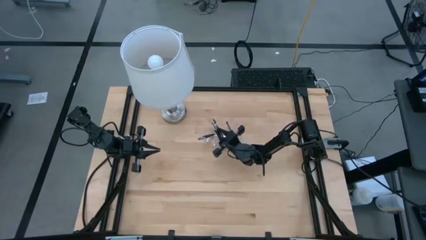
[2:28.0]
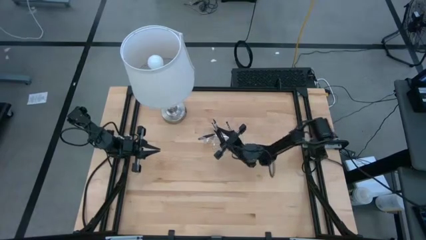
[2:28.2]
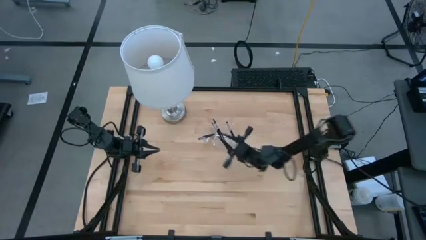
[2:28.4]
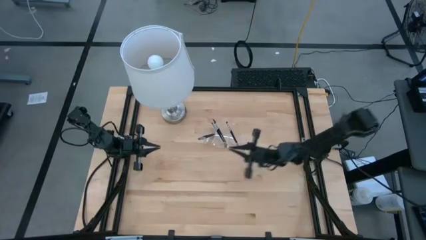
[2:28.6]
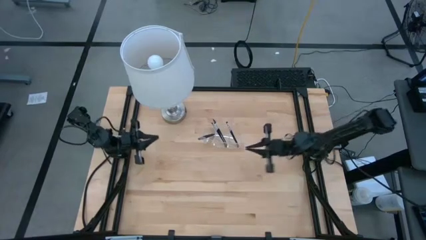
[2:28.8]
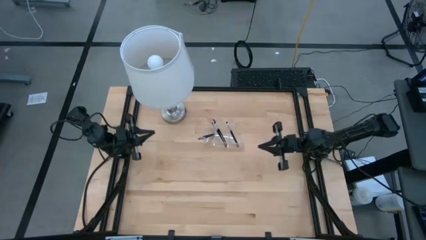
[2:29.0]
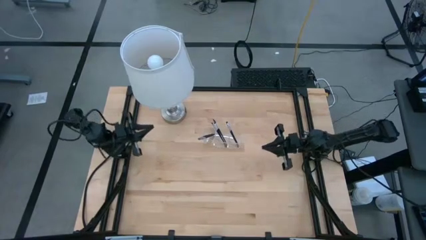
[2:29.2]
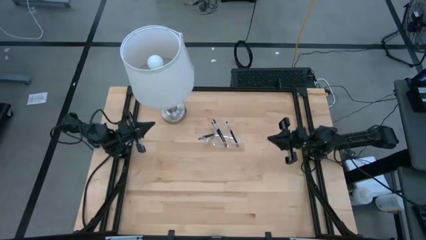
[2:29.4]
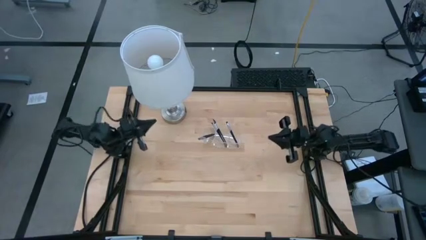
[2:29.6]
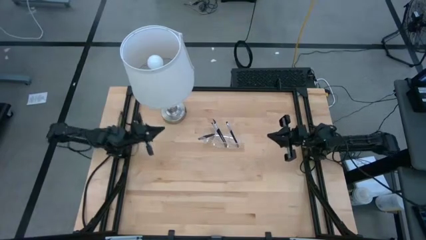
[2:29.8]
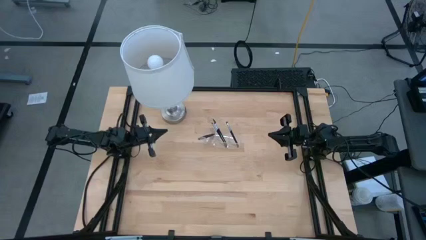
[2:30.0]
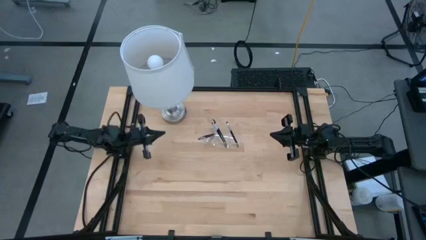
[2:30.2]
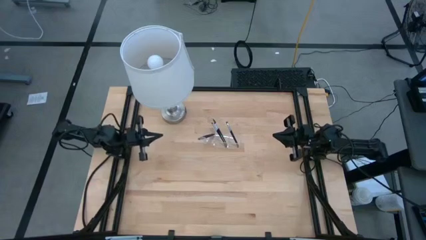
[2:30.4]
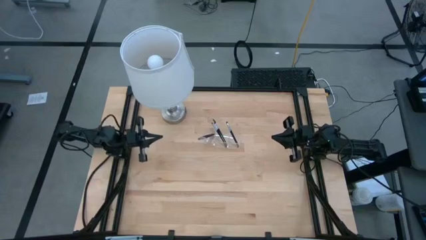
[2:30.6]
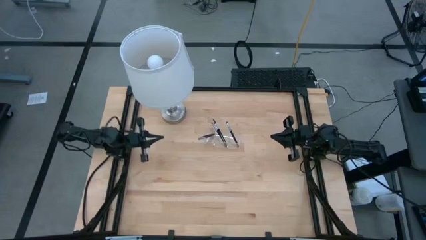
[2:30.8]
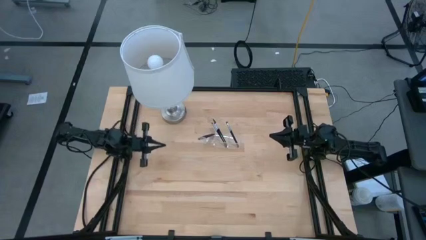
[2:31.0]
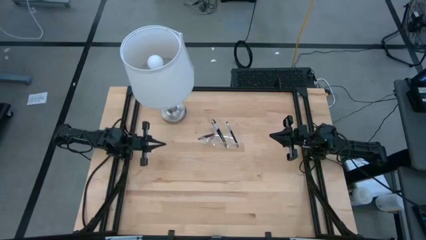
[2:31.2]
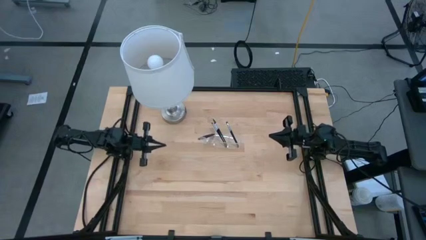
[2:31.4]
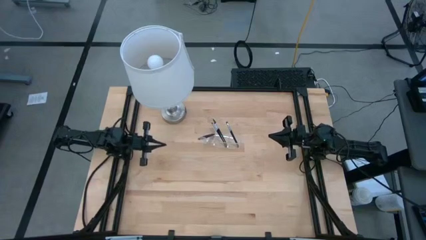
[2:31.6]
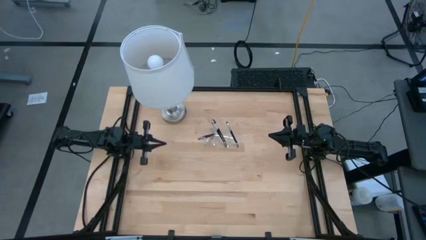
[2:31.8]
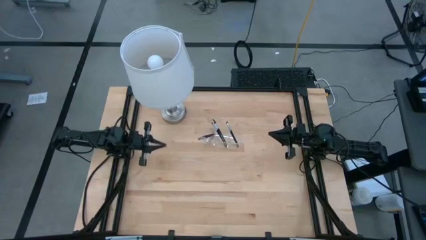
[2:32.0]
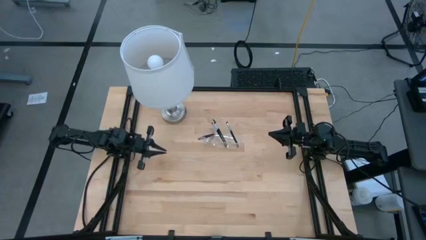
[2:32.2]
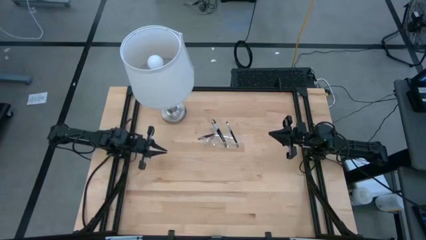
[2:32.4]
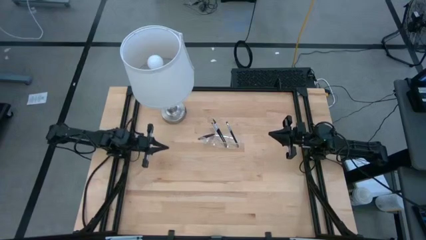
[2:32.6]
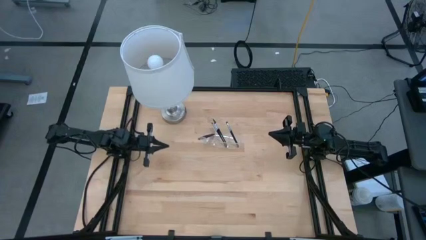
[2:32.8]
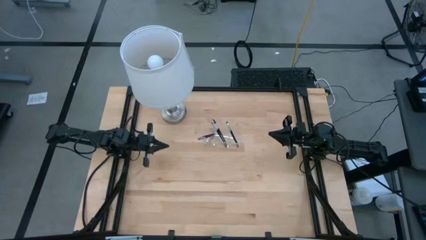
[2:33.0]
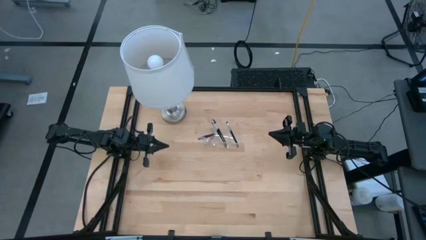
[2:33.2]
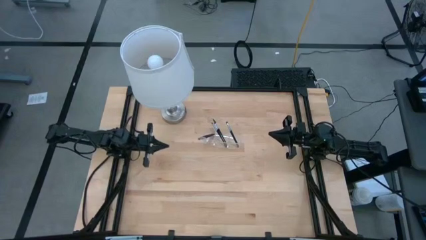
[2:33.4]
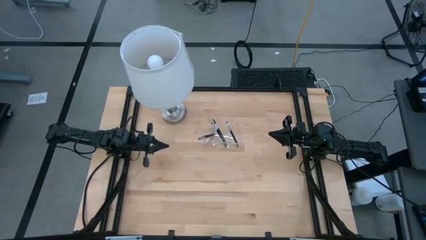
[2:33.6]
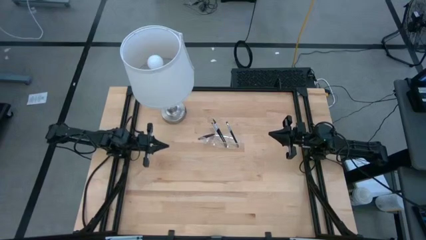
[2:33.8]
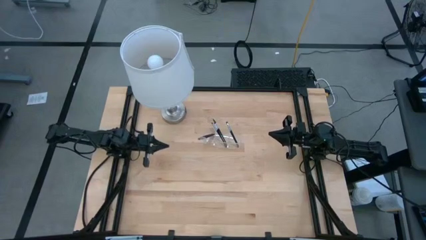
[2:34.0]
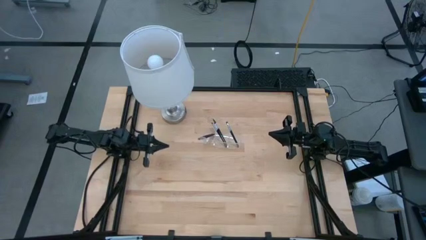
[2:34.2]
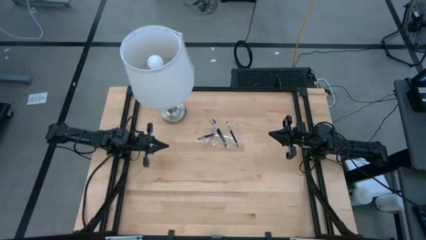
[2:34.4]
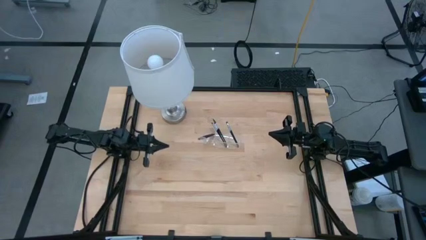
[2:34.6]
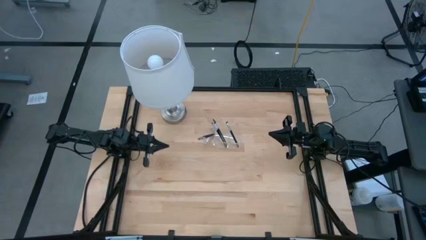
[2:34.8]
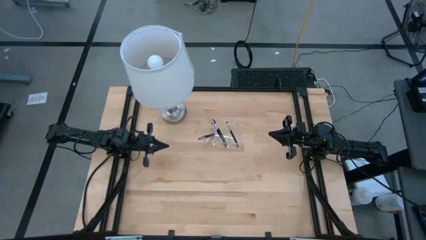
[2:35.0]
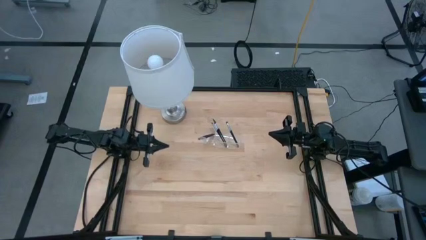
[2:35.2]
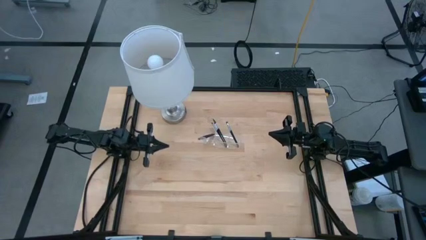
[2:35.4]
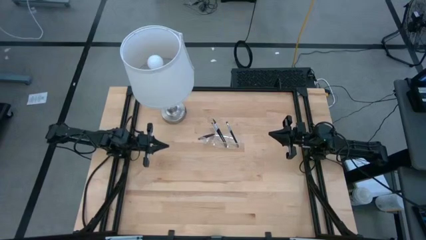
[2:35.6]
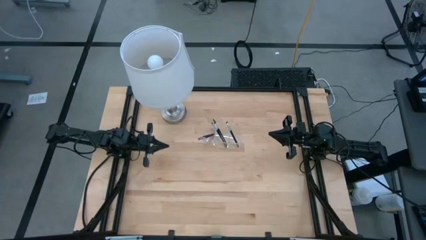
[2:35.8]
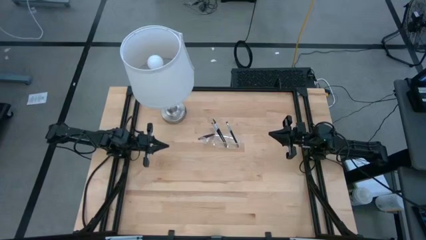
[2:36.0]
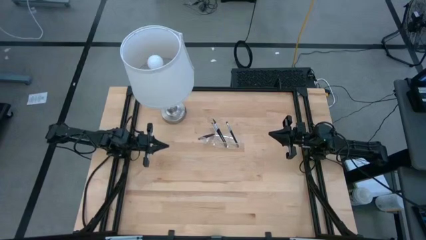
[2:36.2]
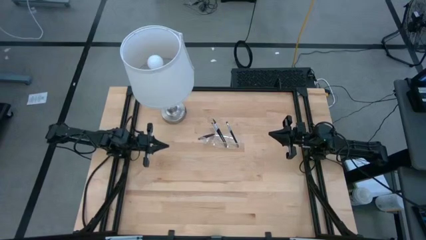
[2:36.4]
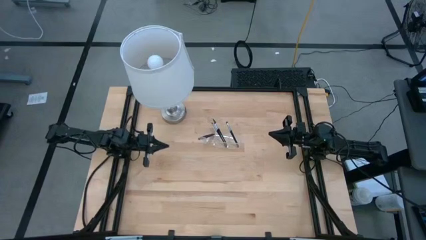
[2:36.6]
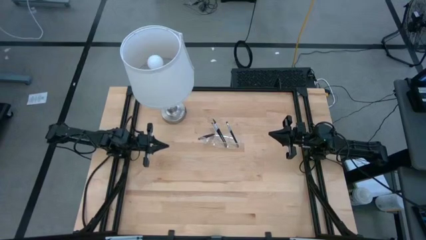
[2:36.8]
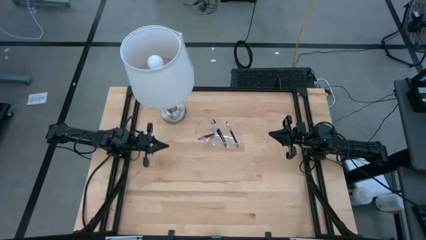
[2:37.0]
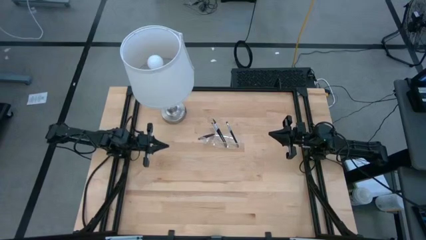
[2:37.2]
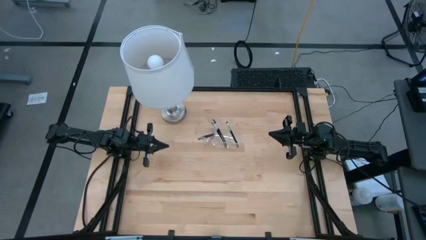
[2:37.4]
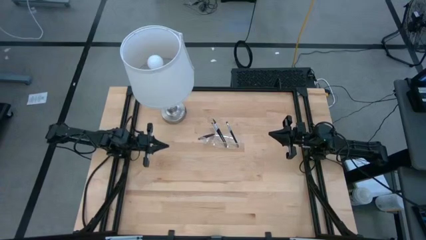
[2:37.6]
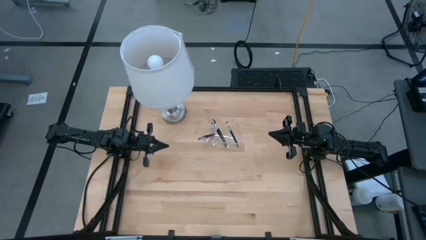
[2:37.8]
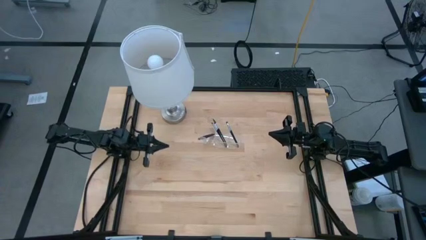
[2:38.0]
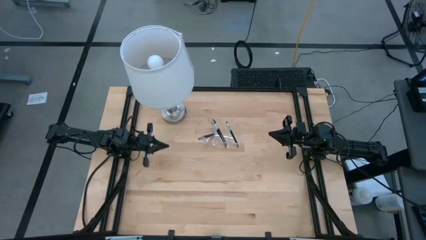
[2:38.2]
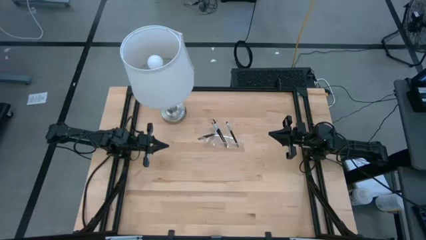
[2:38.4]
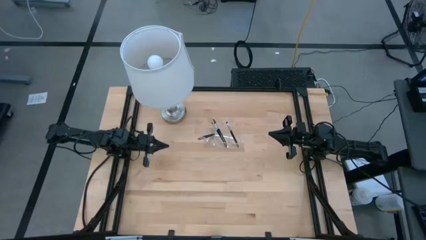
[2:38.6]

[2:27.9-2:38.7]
Task: Sort items
Return to Home Position

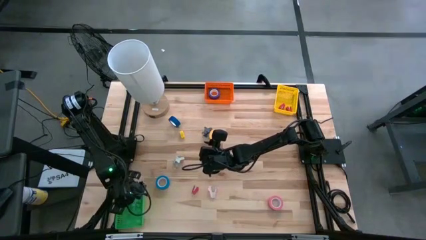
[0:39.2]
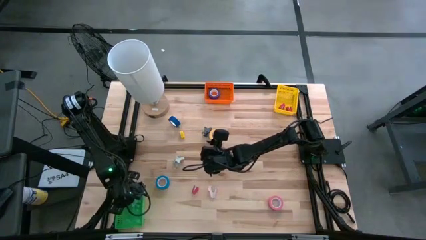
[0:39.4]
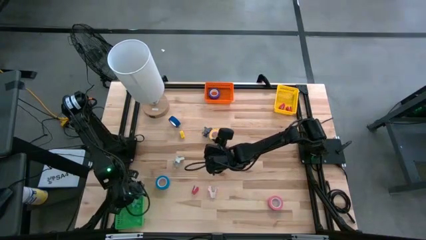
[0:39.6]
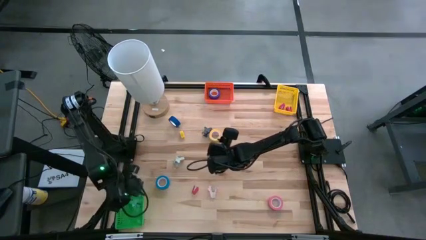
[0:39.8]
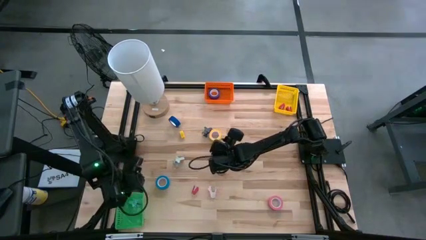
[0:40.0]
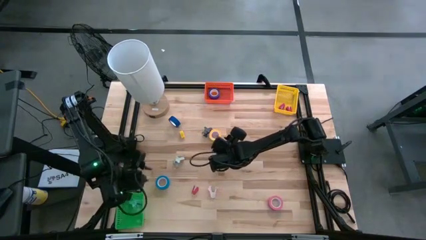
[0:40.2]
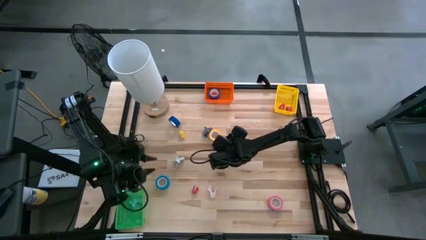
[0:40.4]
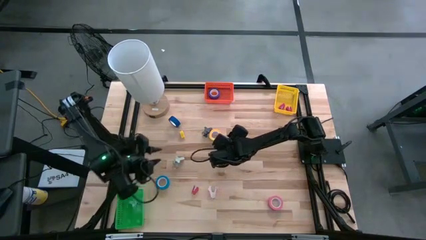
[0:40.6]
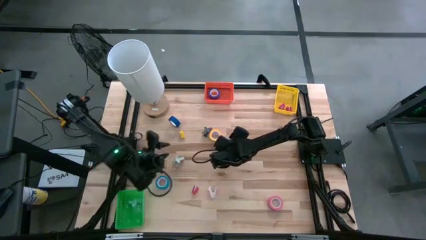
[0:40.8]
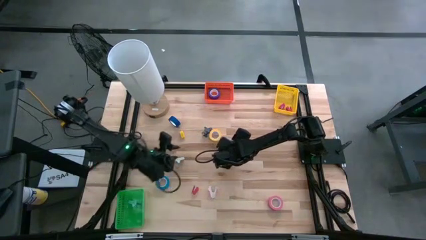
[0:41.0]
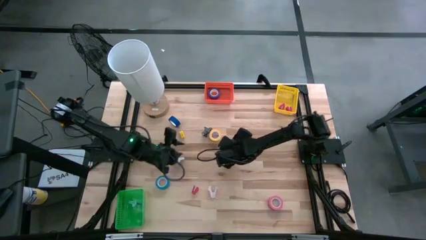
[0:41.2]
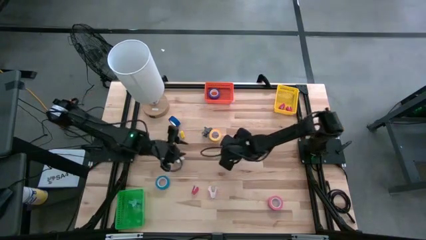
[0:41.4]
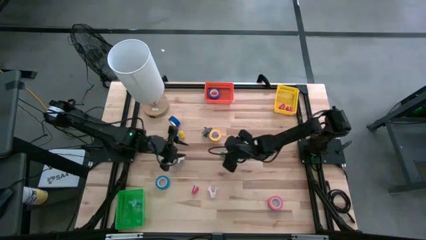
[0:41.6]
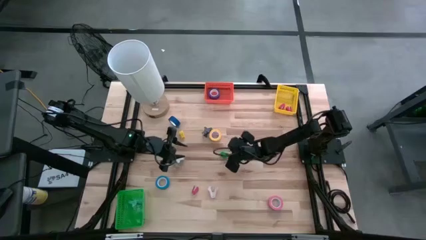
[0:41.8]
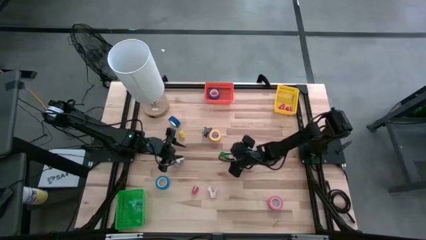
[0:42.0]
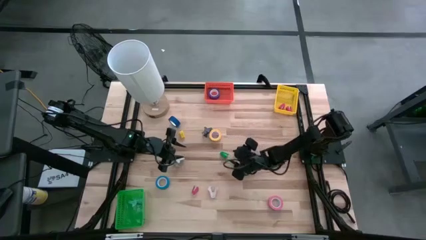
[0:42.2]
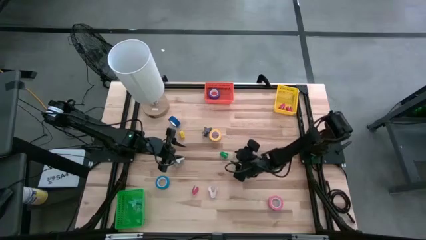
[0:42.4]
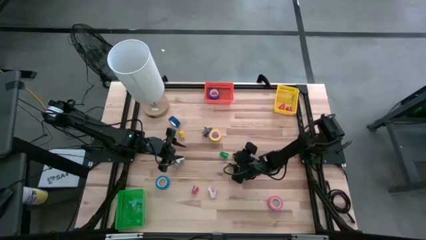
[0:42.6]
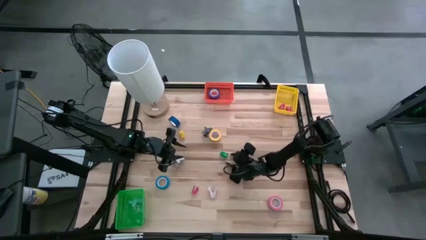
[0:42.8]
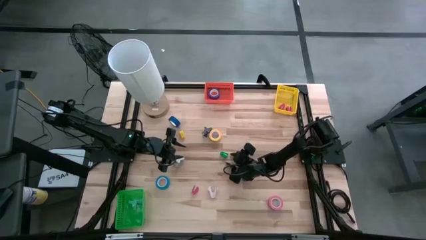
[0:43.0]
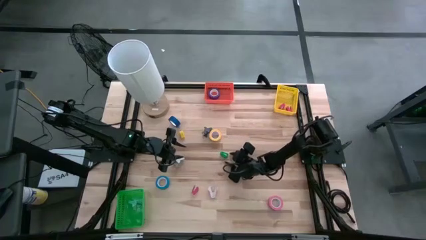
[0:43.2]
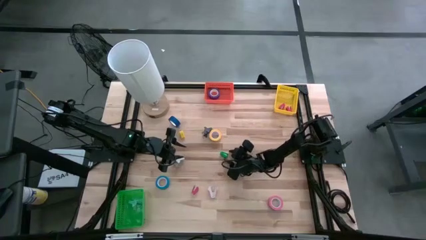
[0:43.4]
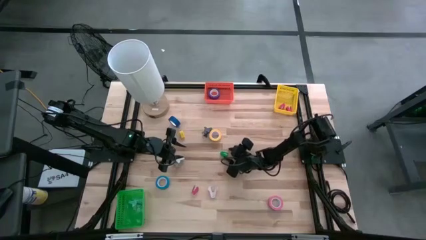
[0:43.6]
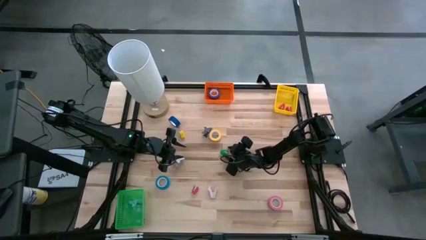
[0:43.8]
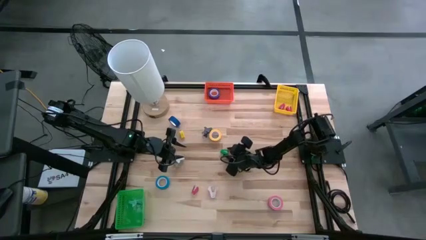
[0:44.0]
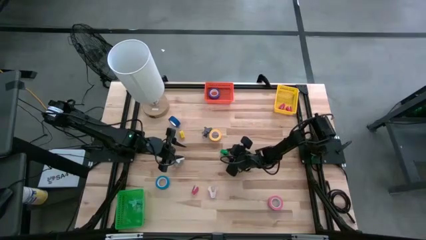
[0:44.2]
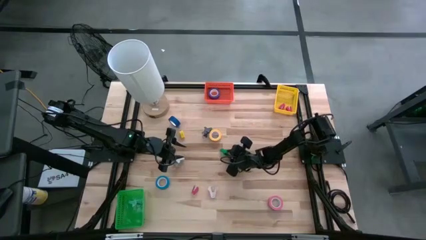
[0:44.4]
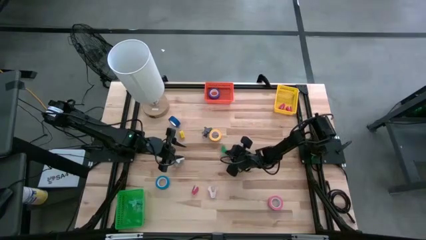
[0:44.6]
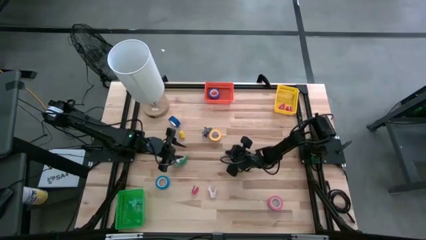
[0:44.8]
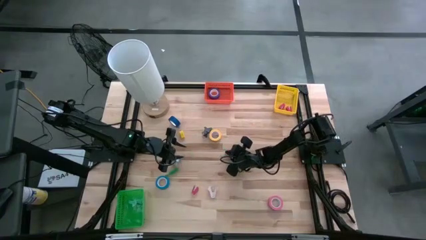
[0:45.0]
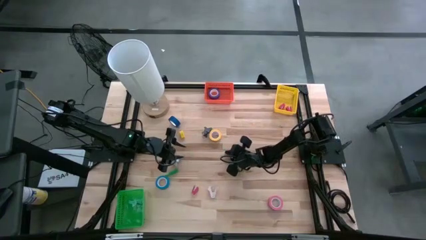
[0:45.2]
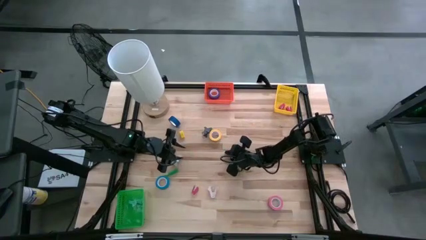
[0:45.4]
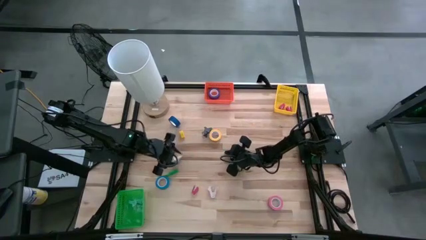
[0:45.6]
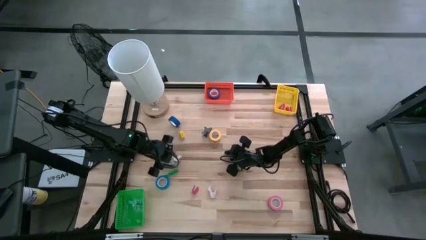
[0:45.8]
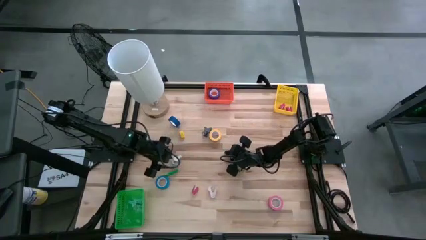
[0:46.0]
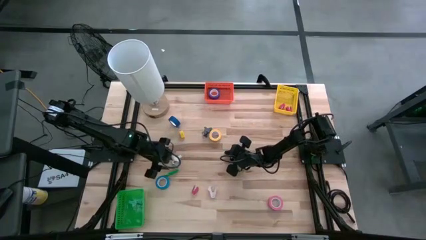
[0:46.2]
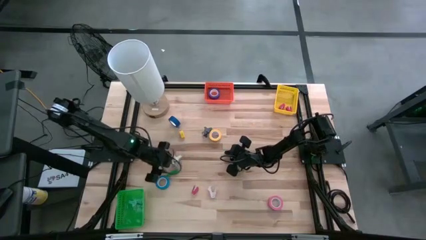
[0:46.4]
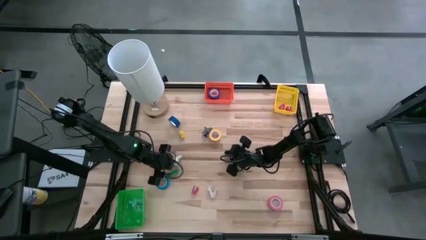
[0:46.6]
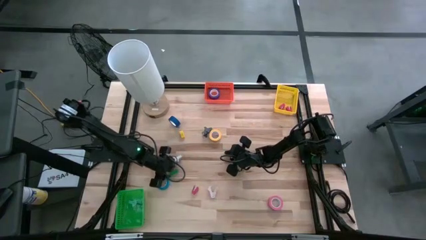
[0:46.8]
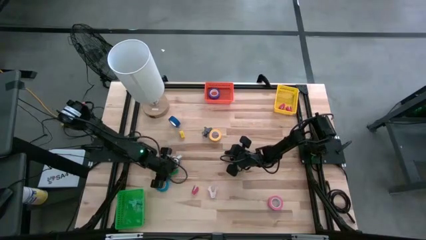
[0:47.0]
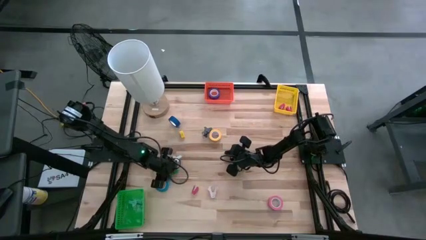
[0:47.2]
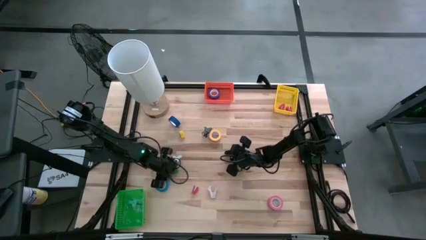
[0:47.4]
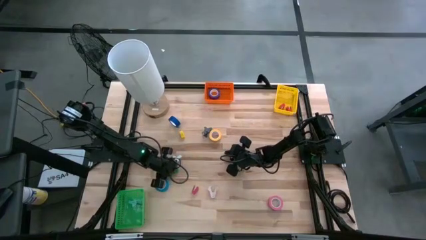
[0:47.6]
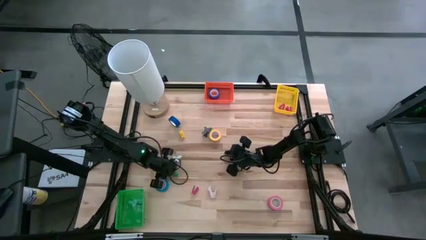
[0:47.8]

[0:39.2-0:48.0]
Task: Pick and place Stapler, Stapler remover, tape
Put the mini green stapler into the yellow bin
